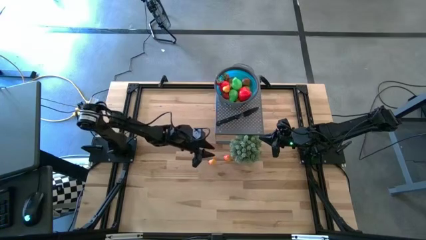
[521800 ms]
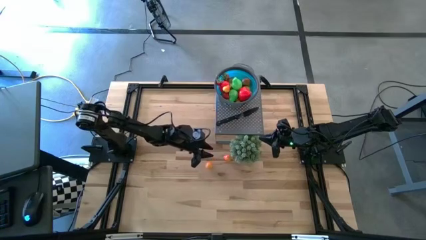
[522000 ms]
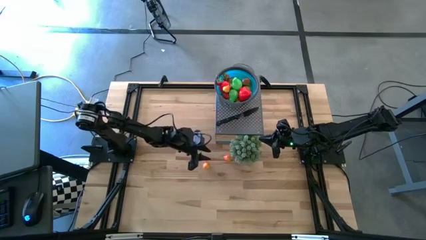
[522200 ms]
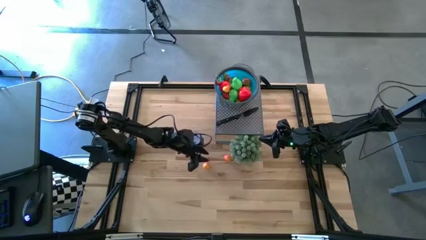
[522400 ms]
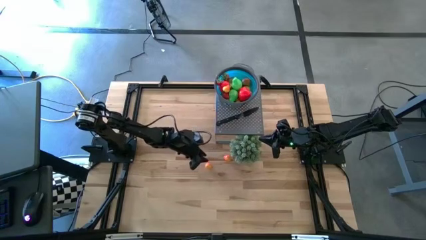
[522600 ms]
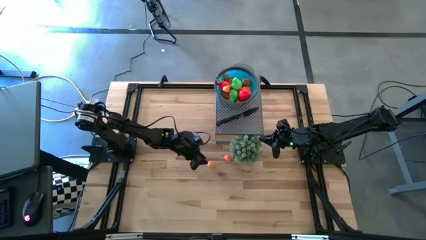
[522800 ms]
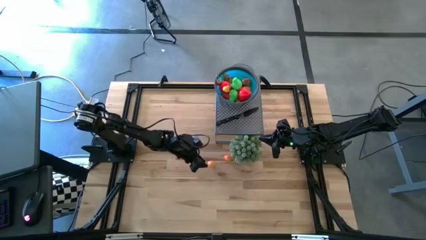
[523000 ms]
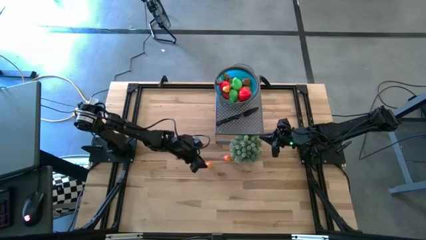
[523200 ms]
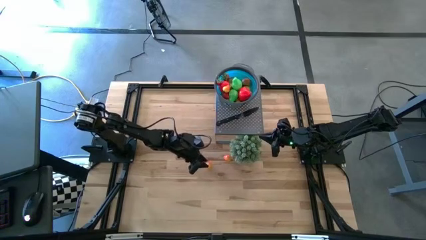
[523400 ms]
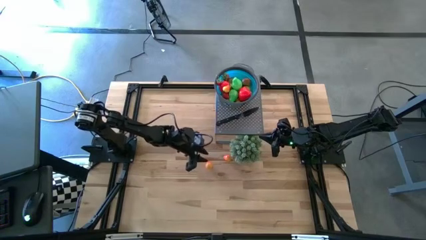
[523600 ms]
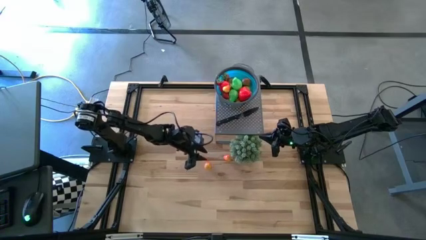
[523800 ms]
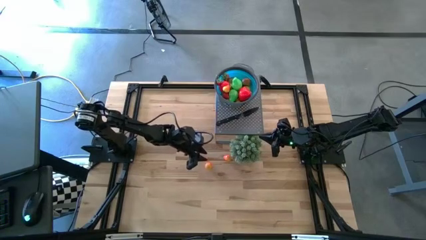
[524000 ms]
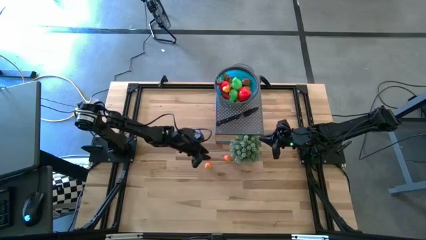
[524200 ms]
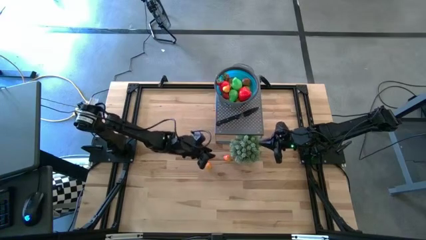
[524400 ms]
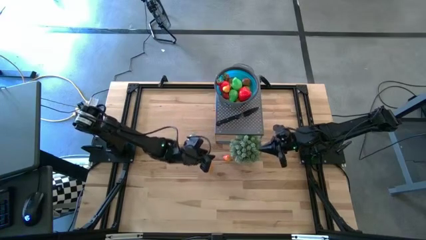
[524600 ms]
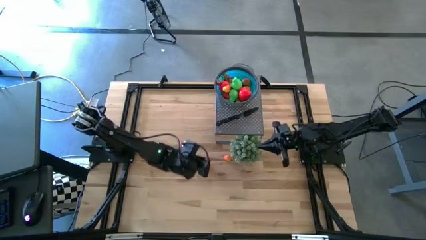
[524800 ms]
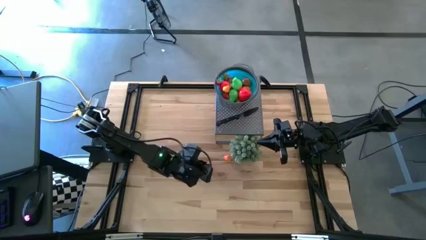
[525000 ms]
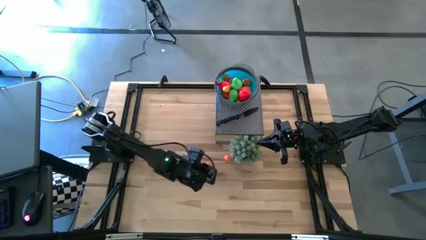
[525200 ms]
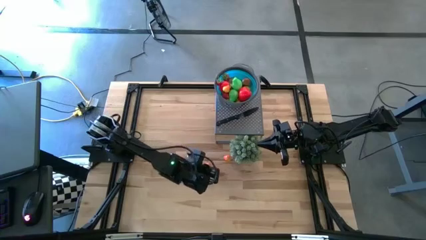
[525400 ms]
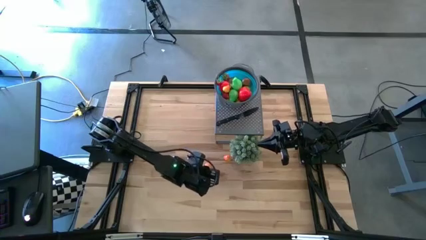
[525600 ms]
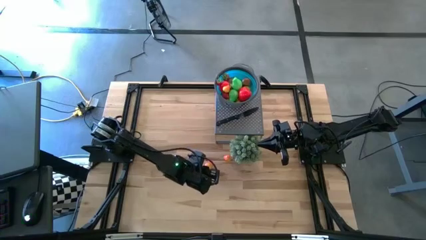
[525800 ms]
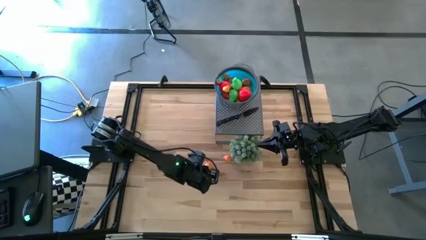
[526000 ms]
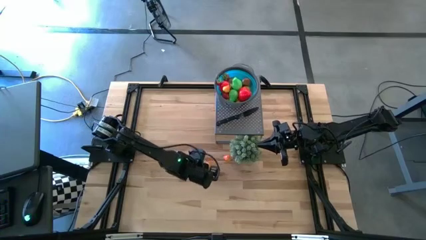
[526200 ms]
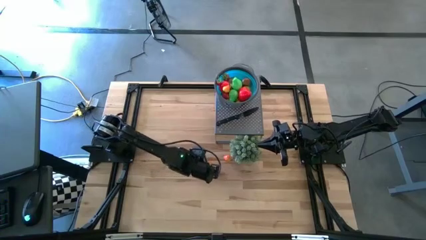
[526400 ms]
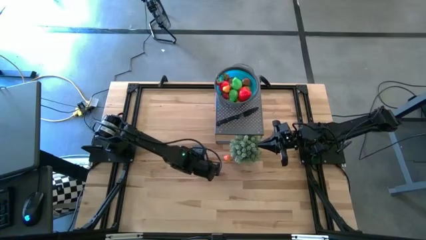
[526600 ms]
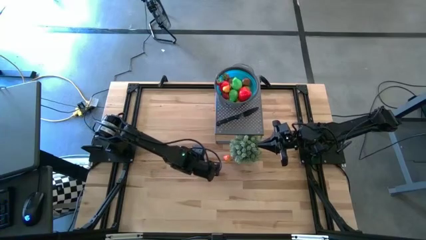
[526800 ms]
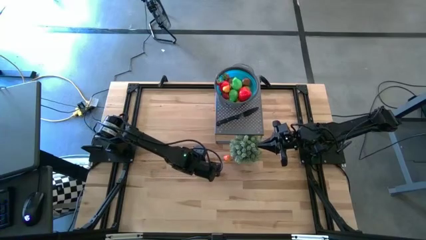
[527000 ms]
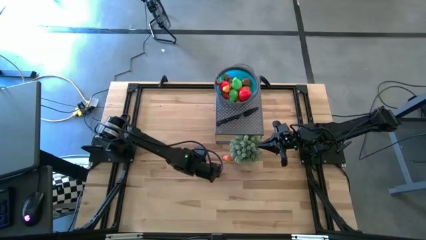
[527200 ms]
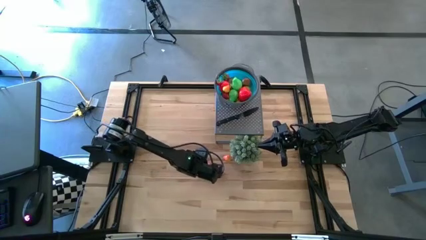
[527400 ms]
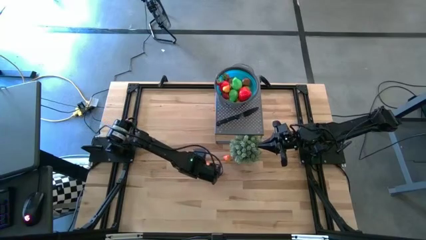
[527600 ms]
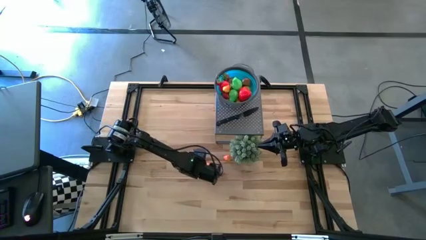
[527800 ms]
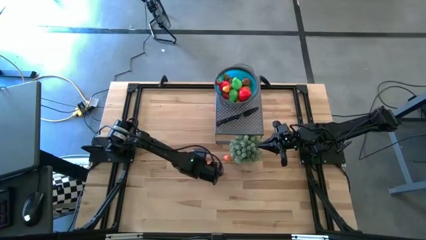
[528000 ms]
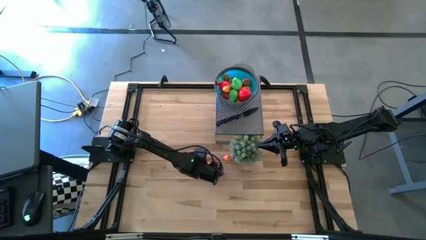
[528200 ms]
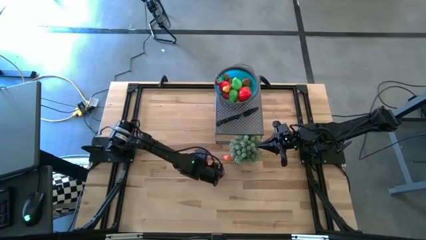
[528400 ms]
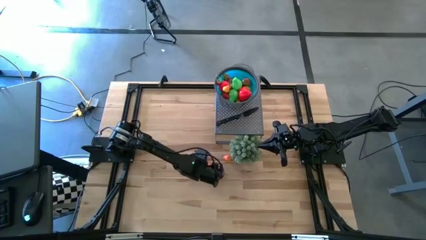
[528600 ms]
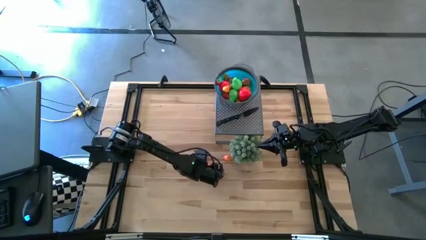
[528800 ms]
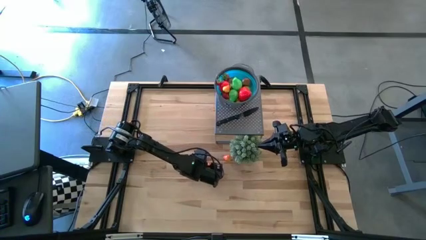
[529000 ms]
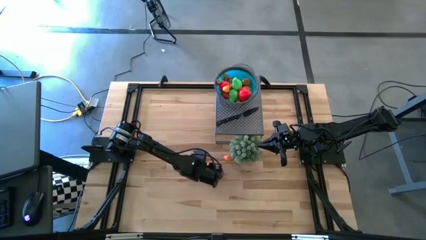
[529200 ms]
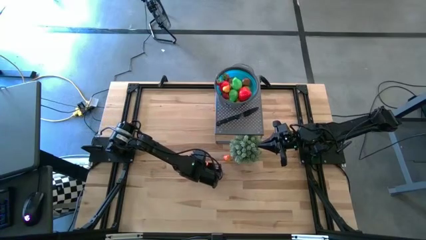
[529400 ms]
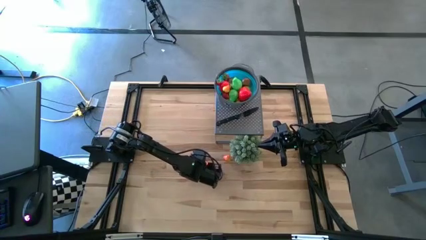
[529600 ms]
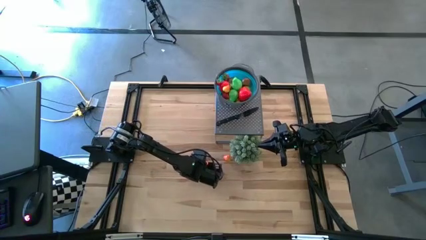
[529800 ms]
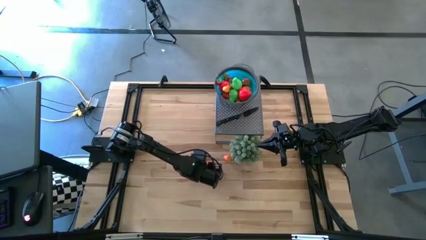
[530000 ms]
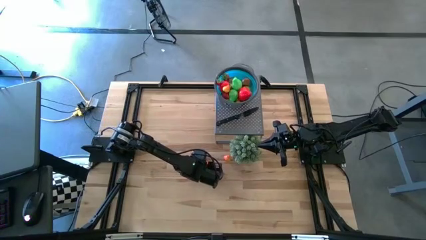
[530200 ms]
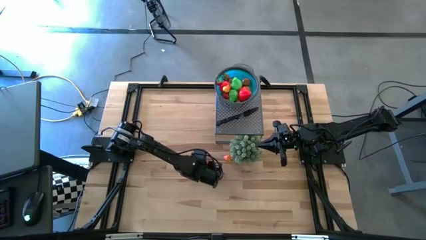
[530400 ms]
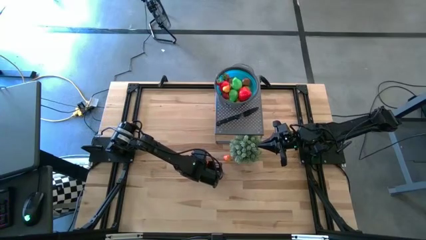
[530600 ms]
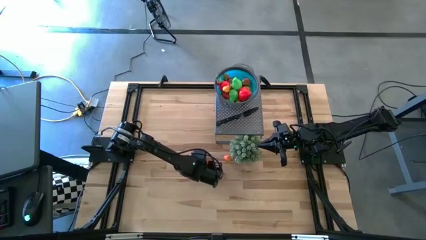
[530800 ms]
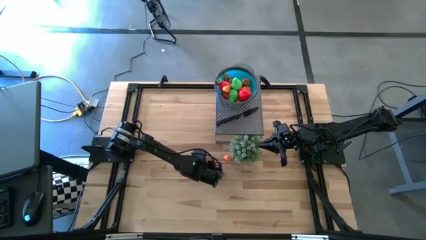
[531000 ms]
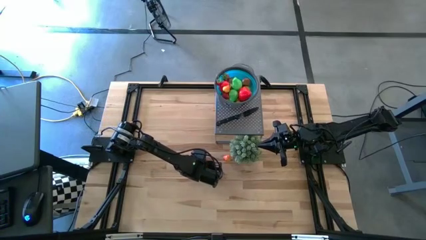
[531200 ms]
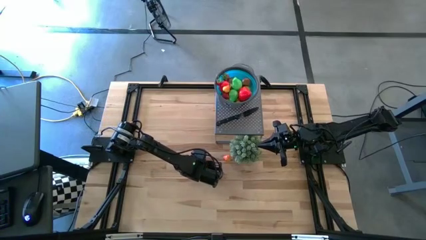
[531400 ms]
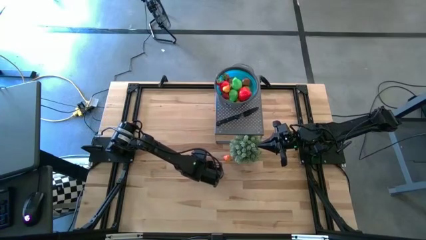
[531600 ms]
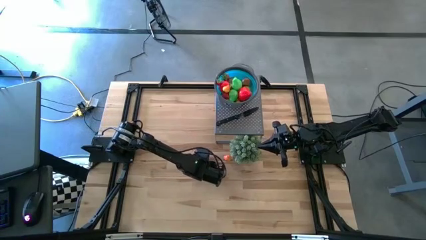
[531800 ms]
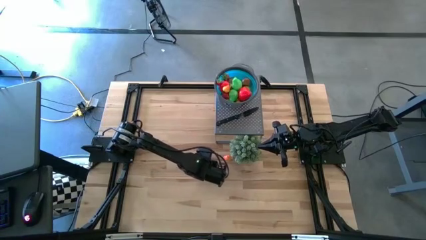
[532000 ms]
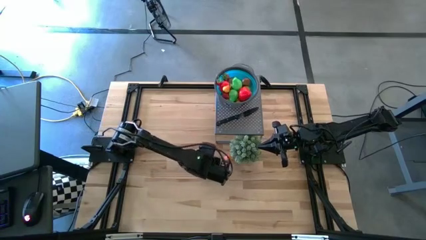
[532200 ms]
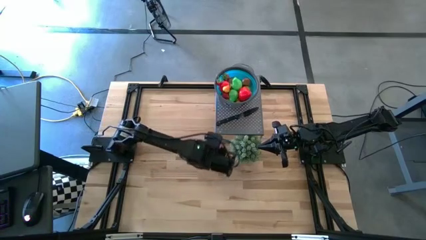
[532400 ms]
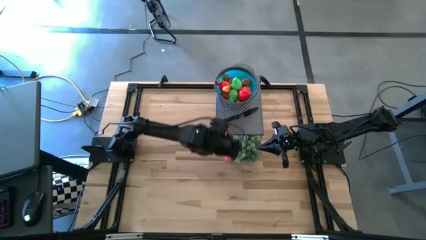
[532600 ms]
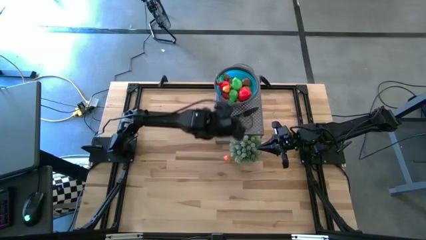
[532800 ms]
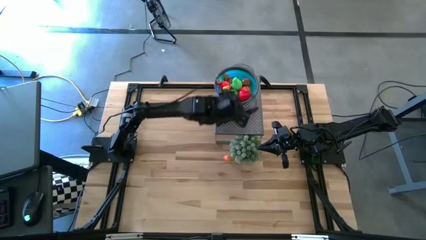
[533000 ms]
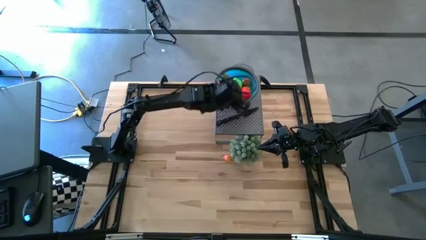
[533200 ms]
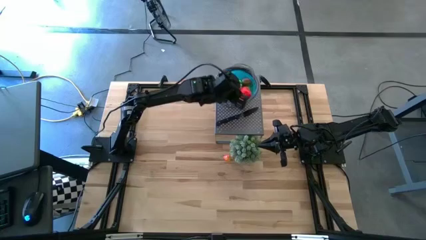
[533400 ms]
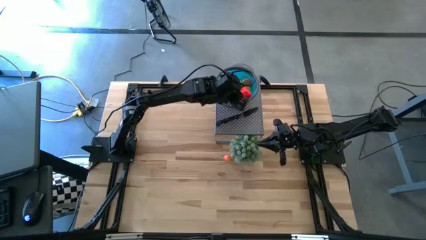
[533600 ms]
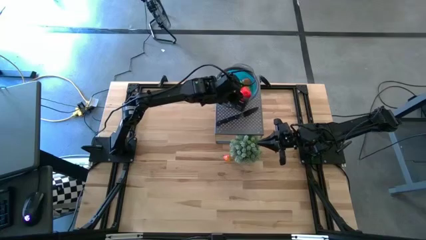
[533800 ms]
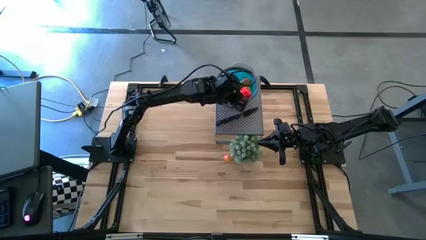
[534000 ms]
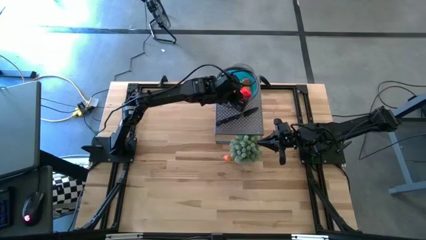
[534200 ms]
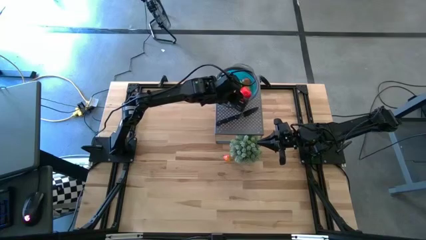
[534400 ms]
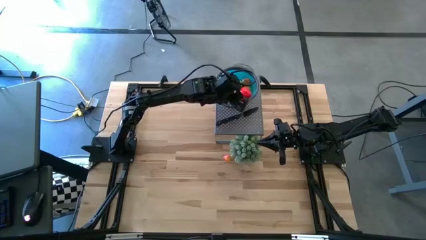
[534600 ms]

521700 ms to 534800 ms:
Task: Pick & Place Fruit
Put the orange pear in the blue strainer bowl

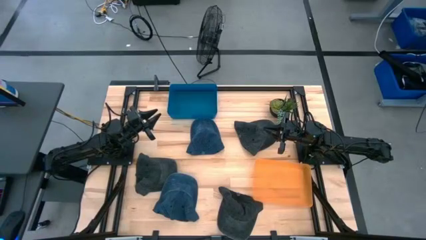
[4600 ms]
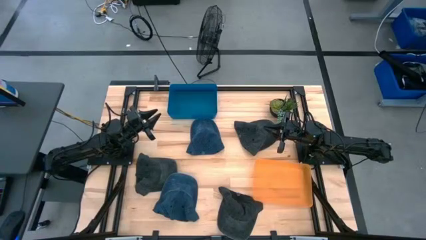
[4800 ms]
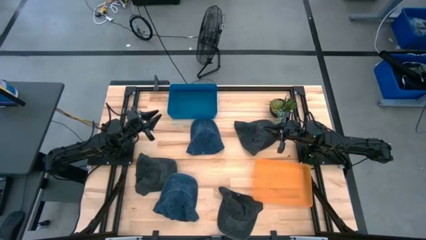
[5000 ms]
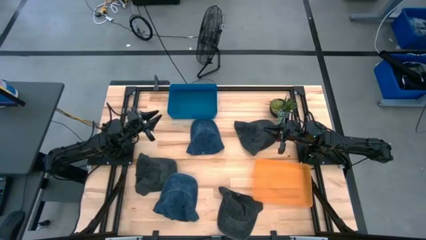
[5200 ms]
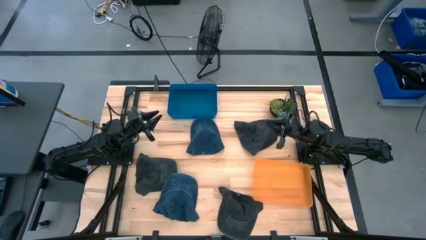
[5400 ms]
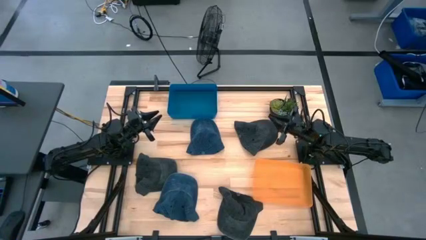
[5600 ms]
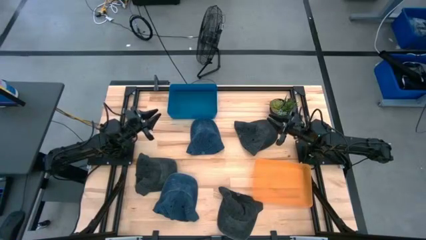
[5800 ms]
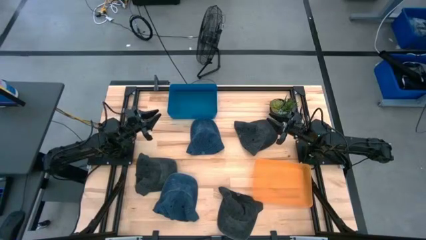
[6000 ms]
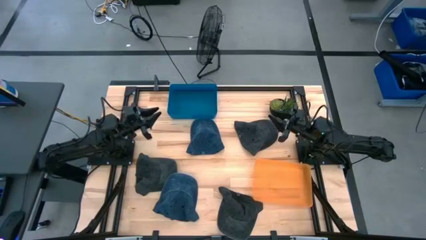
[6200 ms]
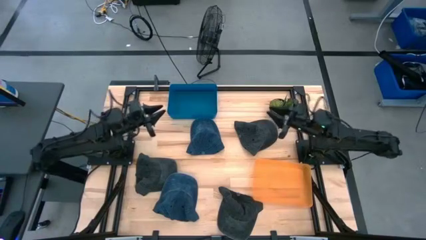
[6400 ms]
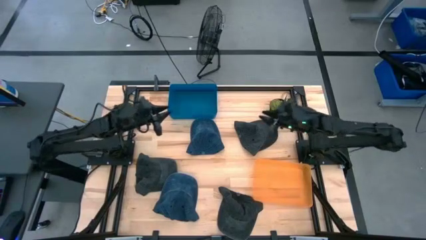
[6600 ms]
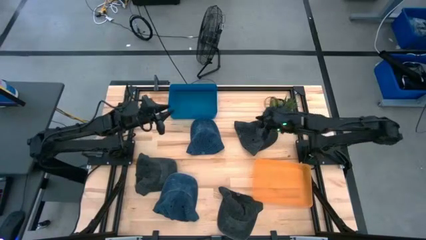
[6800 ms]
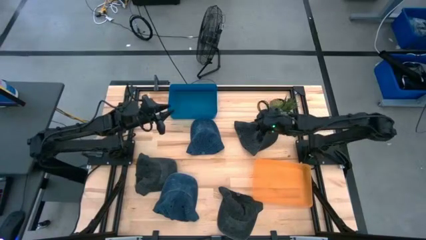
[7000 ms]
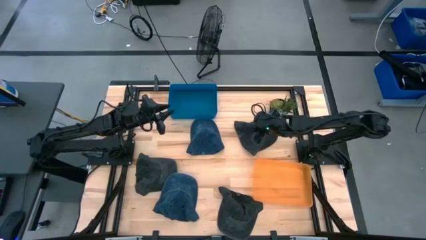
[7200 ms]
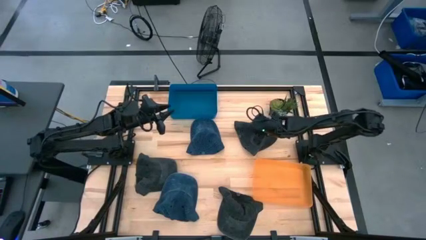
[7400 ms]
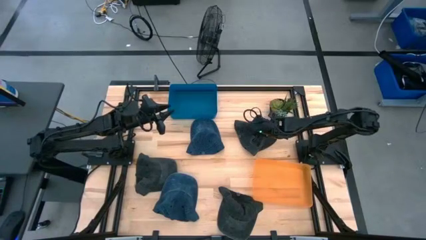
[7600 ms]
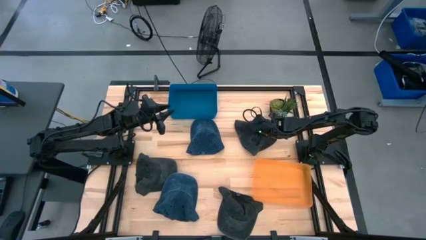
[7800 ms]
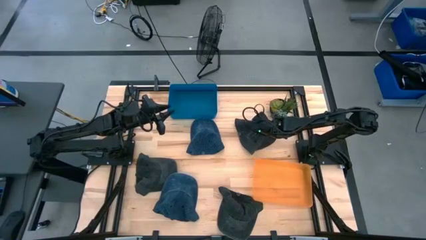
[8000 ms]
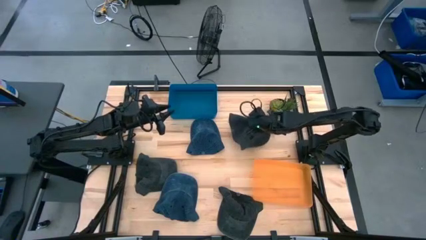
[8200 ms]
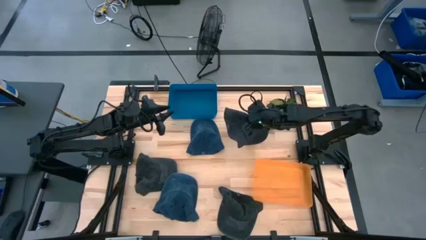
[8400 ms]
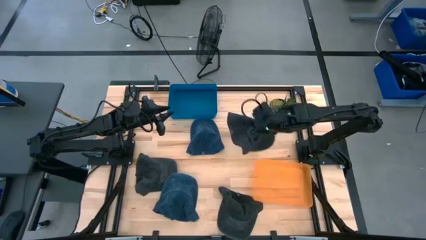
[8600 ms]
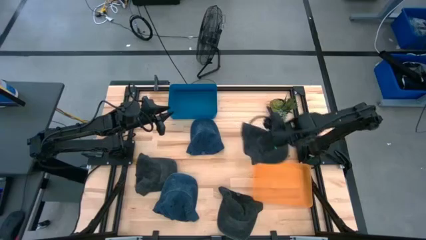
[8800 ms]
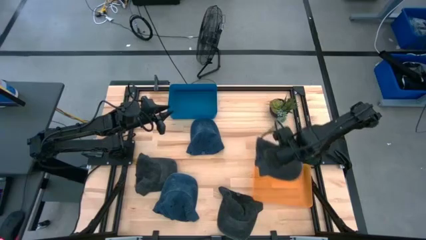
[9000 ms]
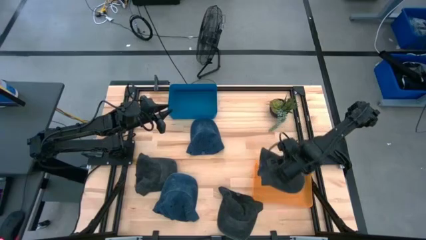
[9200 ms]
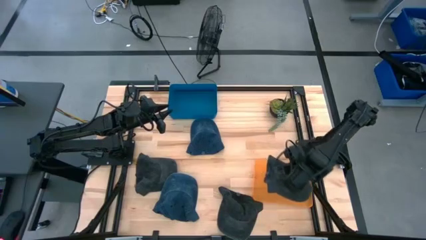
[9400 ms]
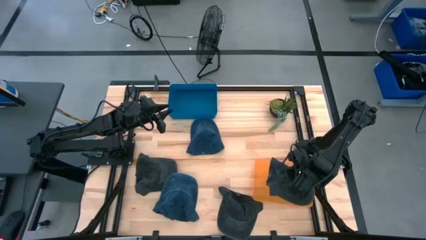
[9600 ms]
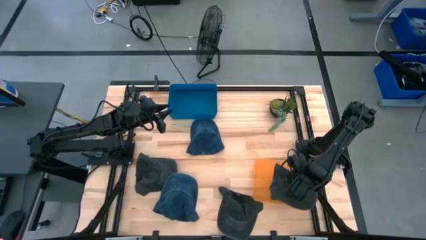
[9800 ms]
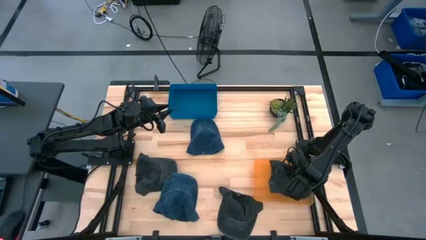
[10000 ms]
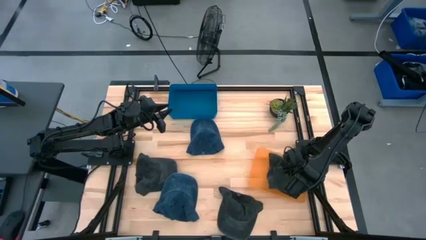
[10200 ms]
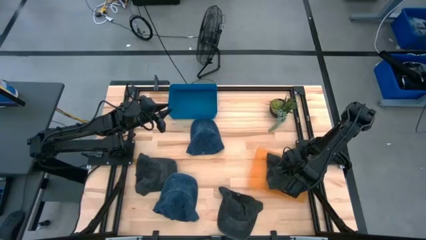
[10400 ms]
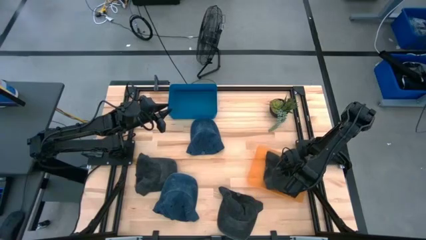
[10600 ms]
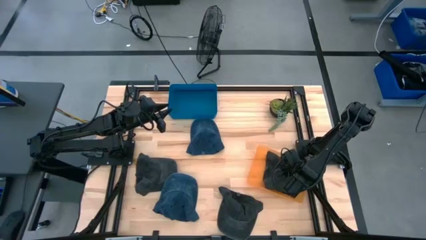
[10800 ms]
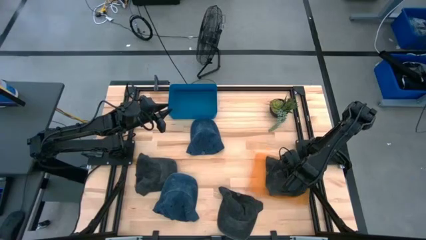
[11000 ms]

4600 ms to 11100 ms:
Task: Pick & Place hat
Put the top black cap into the orange bin
